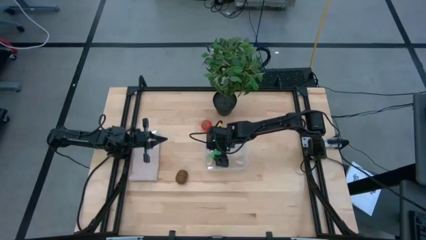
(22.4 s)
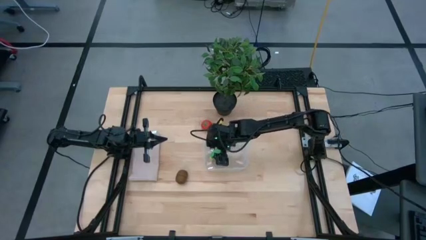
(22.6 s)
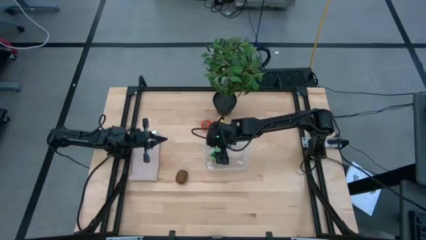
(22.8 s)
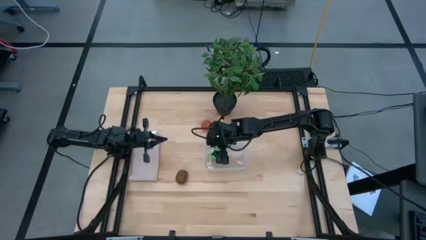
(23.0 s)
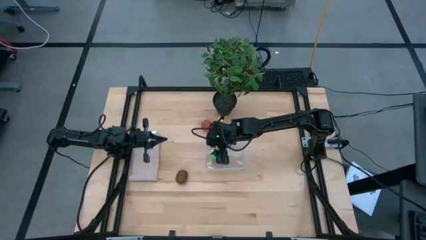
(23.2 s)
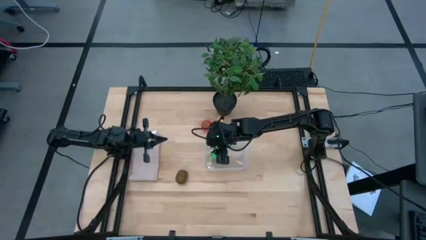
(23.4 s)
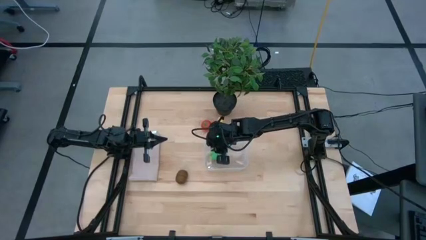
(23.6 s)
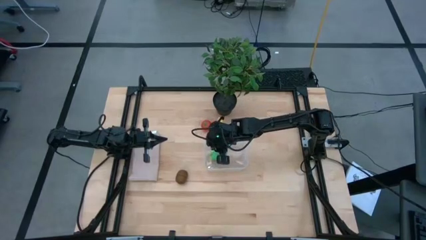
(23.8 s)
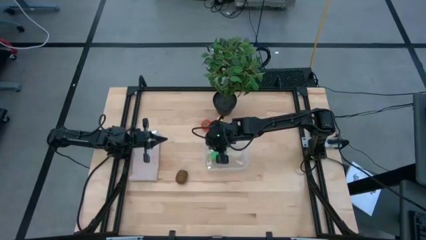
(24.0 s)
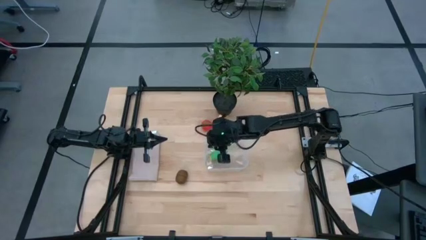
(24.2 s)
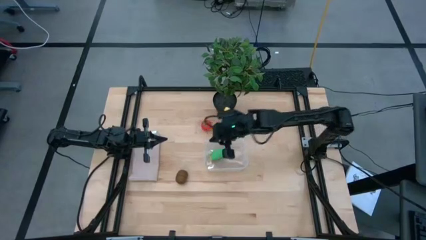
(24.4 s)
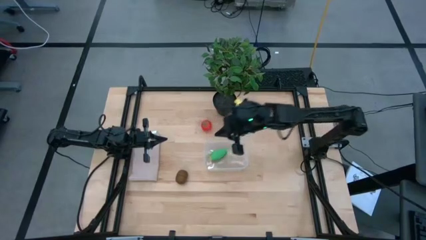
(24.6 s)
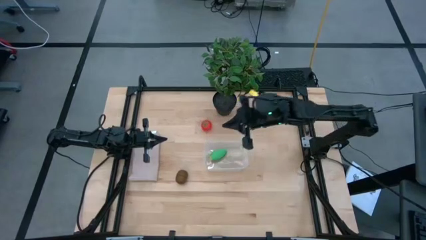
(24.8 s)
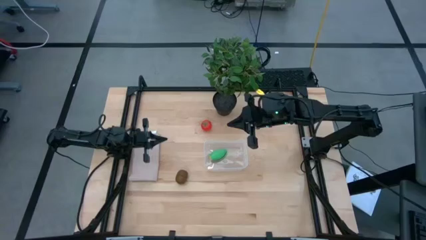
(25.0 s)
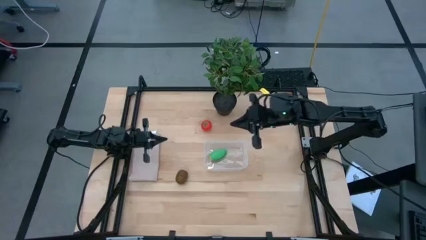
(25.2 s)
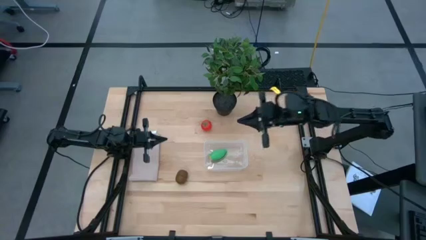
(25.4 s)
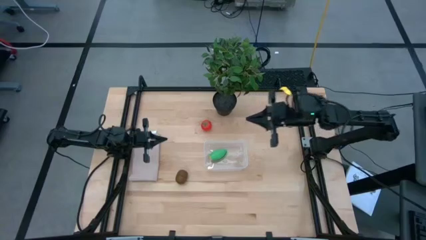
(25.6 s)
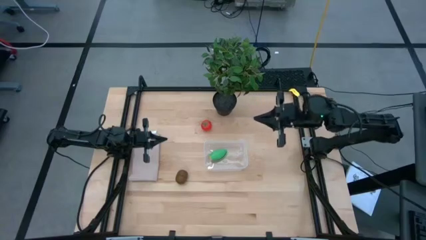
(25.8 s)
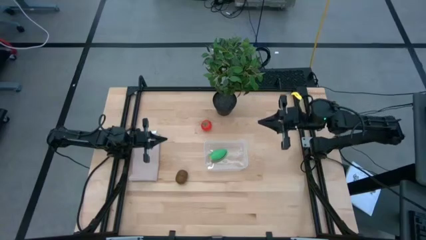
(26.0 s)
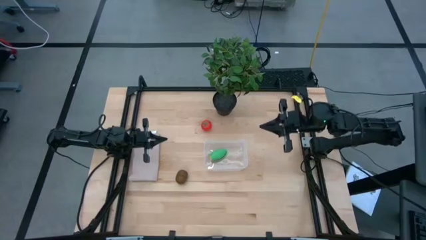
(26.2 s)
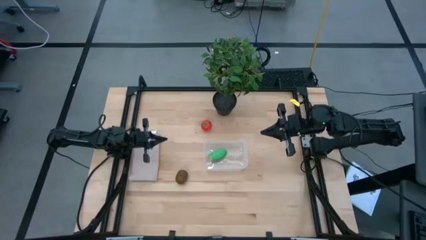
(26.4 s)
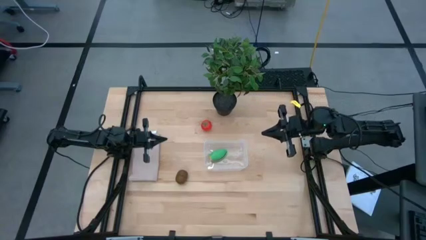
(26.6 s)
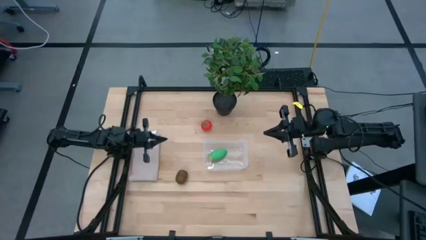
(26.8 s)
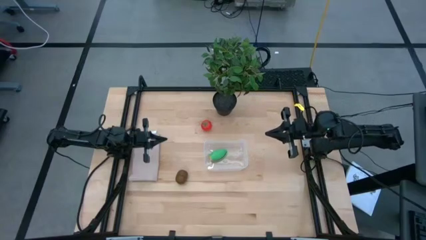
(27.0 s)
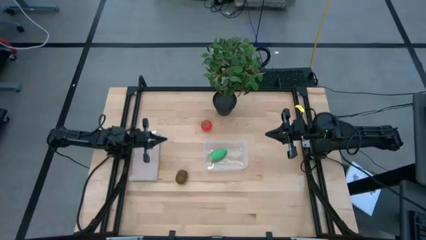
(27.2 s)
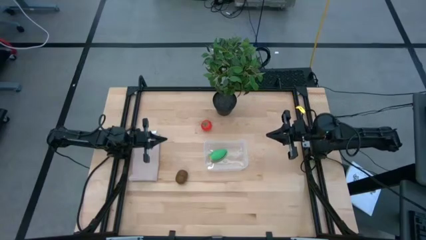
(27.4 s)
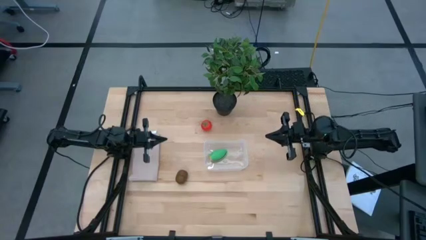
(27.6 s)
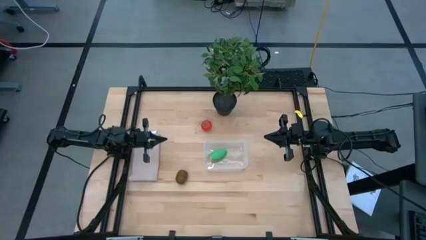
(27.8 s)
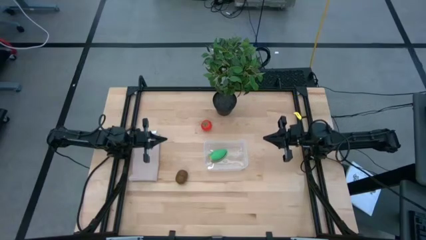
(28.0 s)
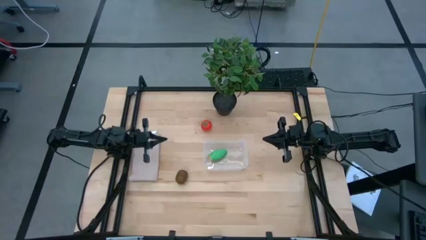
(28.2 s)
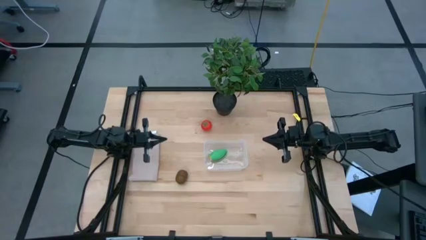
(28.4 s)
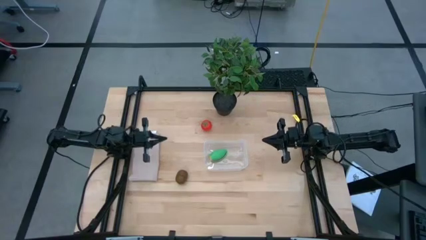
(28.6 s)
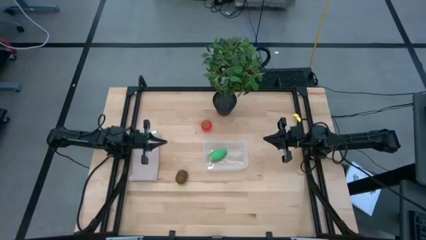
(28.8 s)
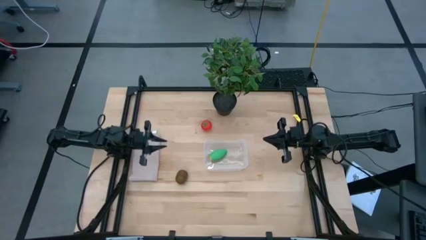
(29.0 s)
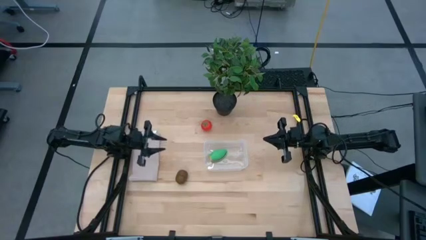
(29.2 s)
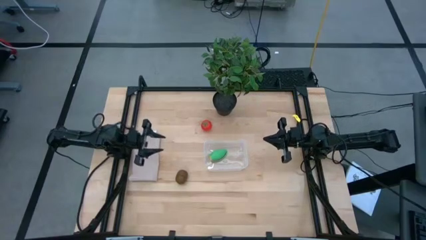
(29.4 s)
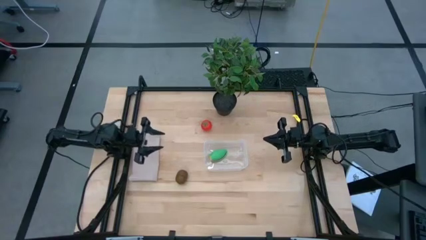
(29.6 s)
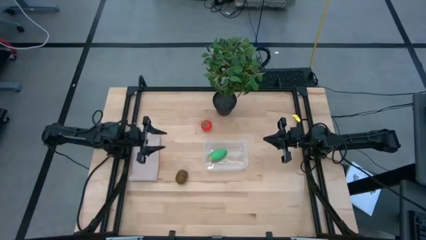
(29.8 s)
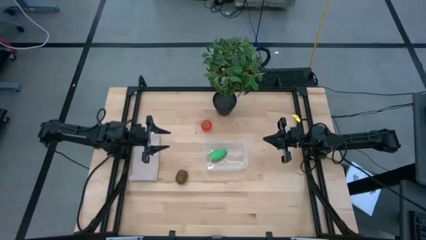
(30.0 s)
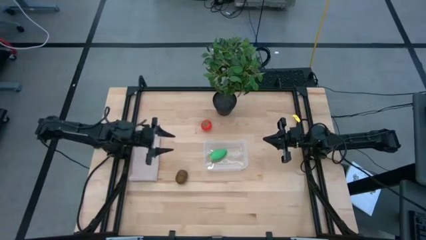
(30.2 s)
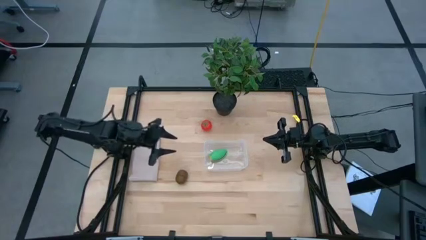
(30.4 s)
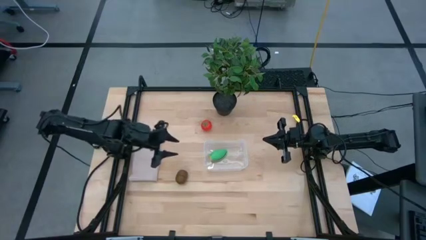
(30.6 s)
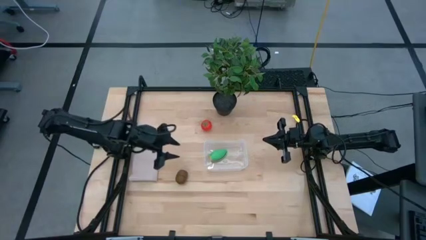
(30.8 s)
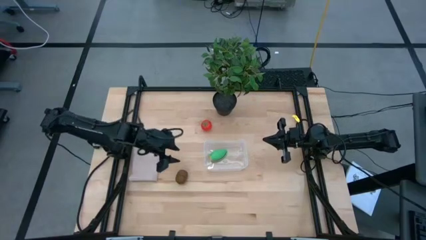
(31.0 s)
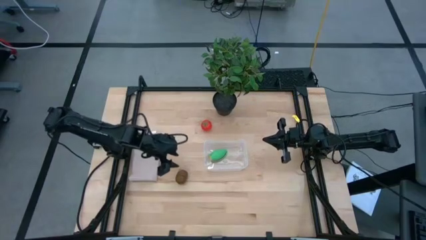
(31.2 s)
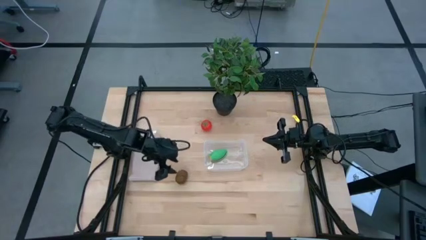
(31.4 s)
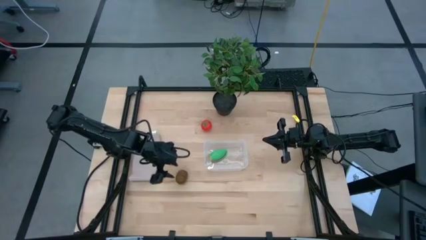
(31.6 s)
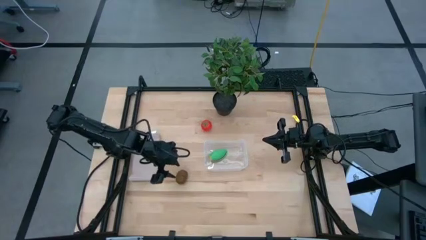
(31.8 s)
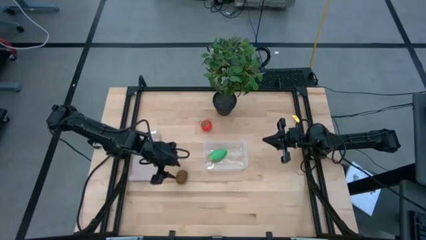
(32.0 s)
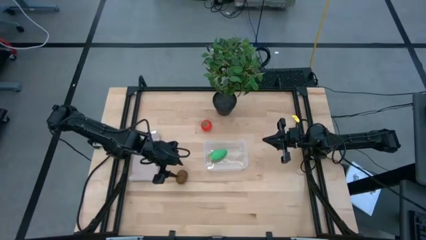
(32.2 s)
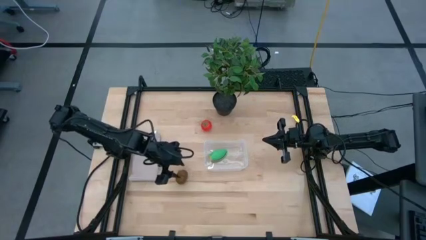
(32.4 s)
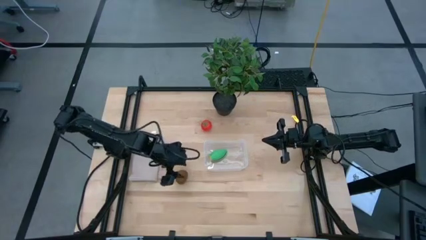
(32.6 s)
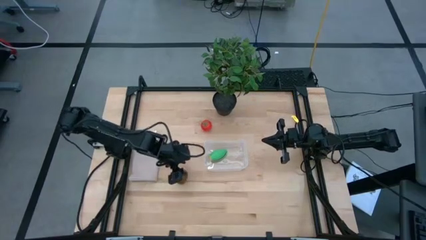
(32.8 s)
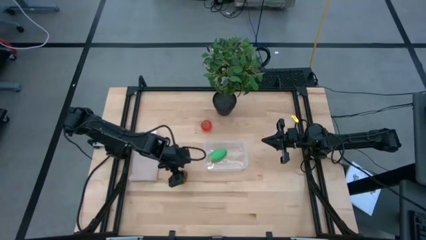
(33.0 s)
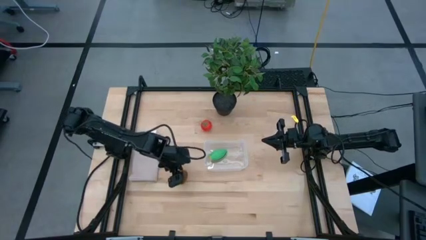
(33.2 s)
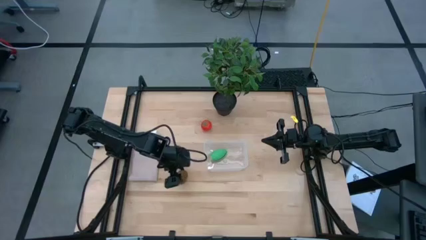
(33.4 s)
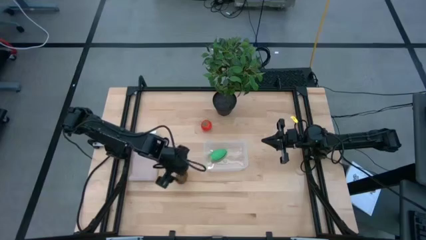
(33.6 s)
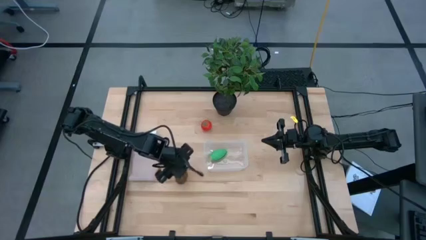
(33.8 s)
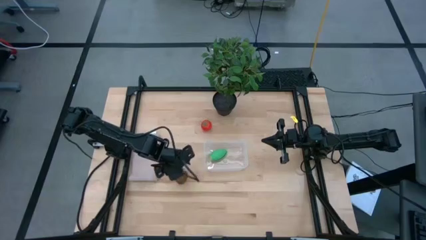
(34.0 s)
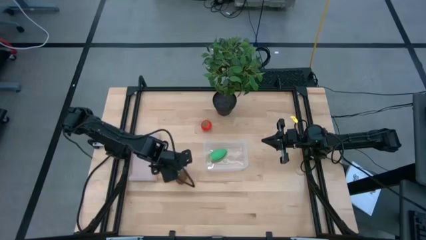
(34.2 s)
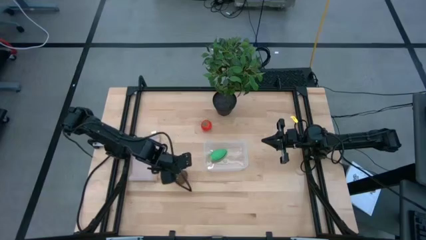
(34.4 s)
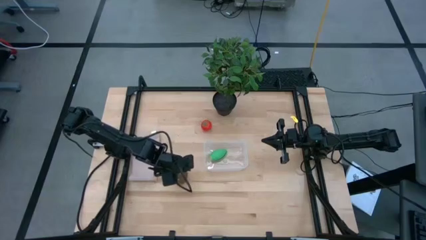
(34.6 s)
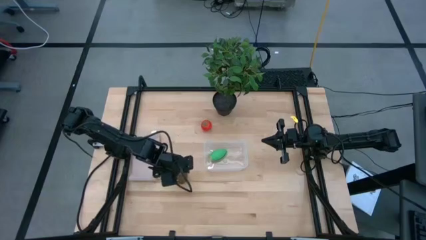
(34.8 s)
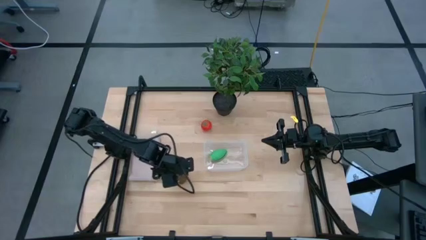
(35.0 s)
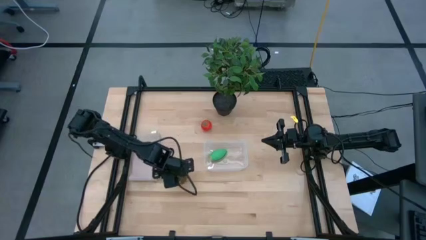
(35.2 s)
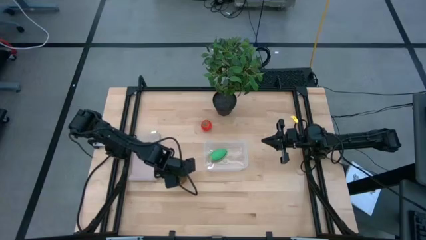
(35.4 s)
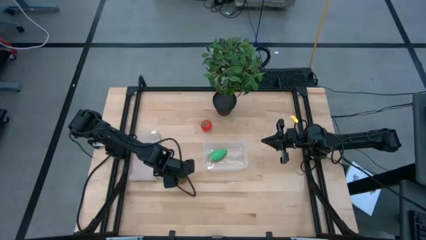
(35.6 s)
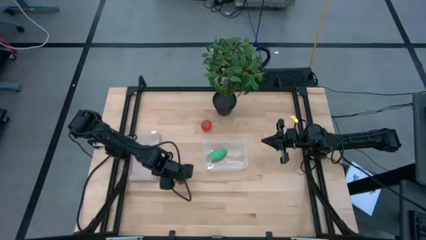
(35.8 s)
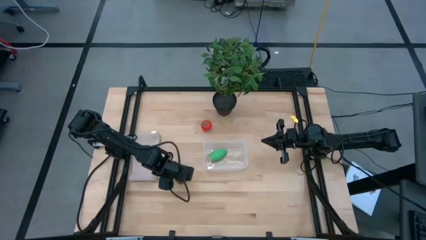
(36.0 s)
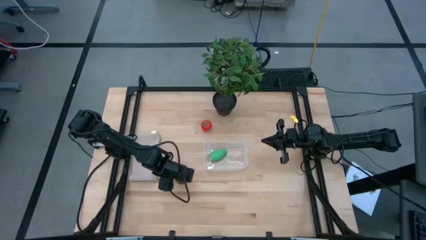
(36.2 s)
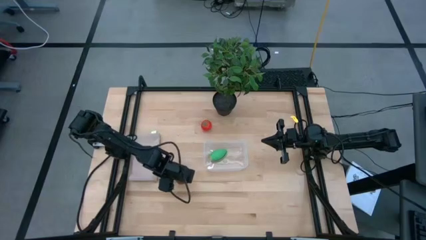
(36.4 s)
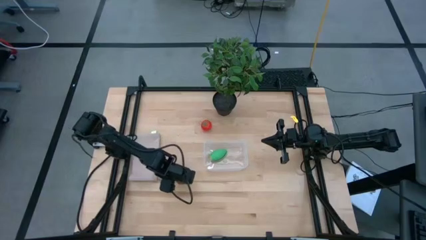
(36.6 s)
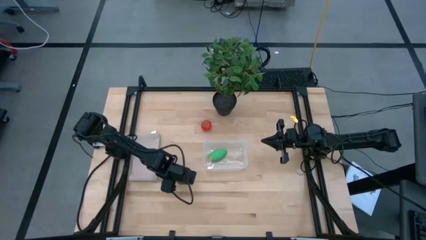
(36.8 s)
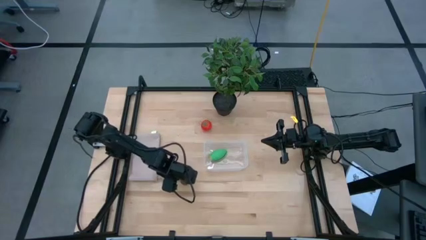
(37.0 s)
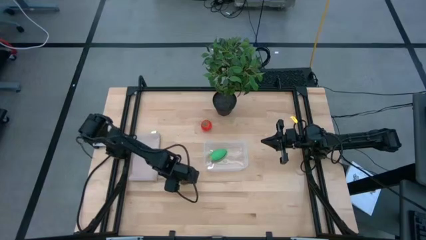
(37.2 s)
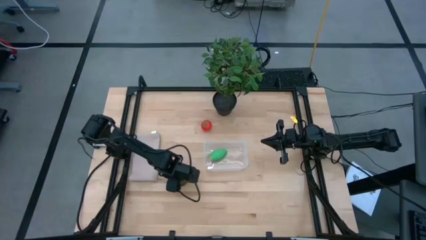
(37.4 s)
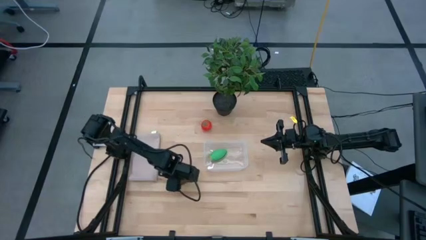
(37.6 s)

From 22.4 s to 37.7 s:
Task: Pick and placing Produce into tupperware
Put the brown kiwi into the transparent bin
